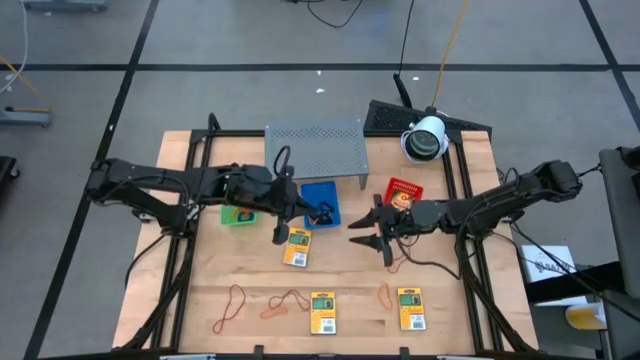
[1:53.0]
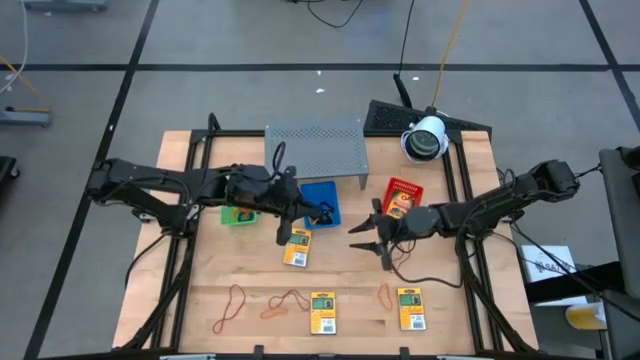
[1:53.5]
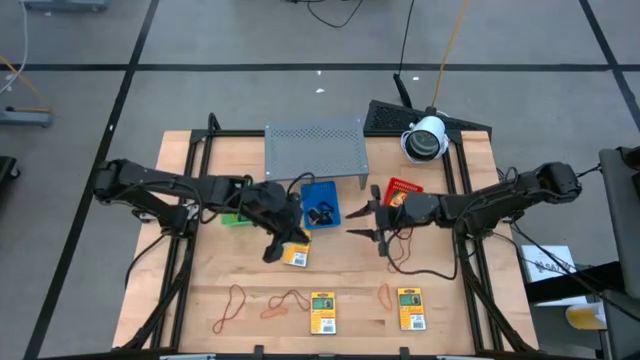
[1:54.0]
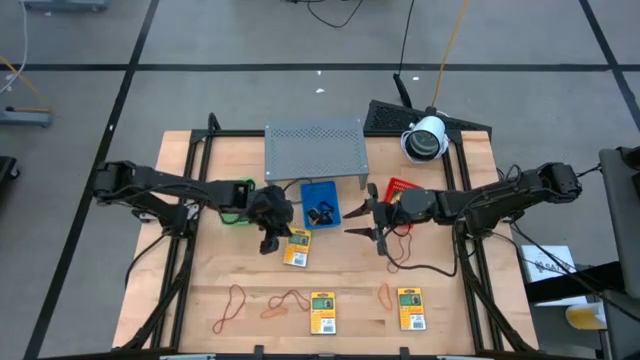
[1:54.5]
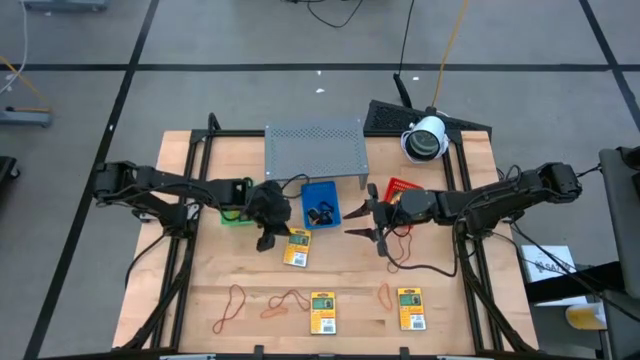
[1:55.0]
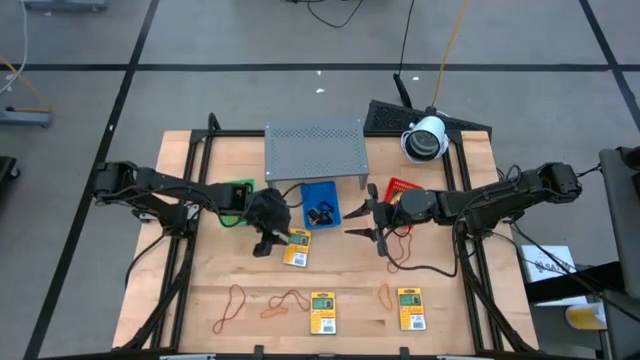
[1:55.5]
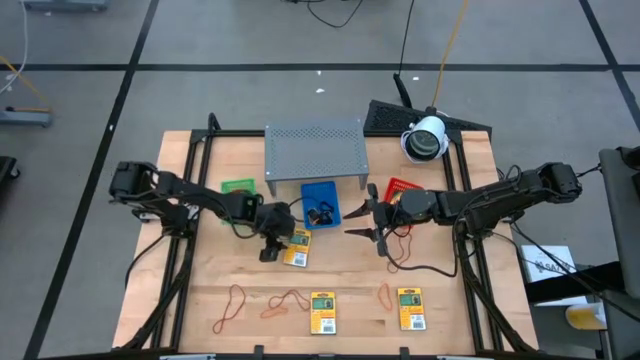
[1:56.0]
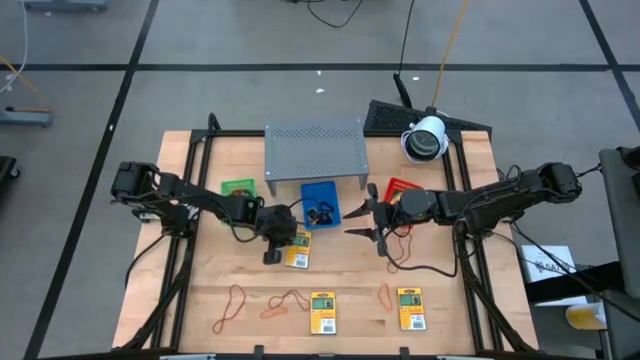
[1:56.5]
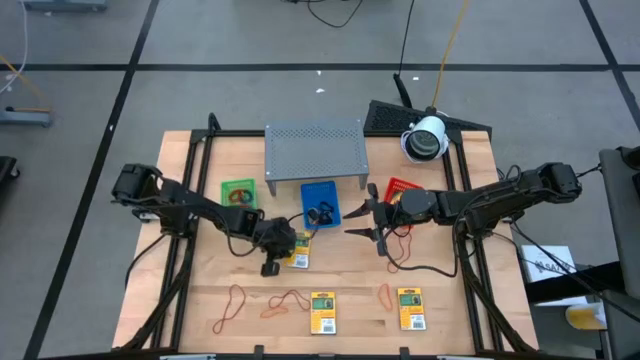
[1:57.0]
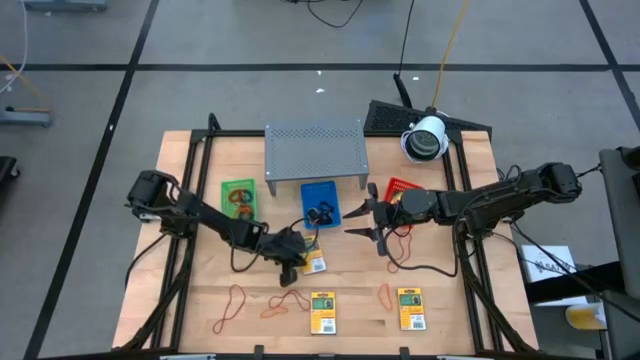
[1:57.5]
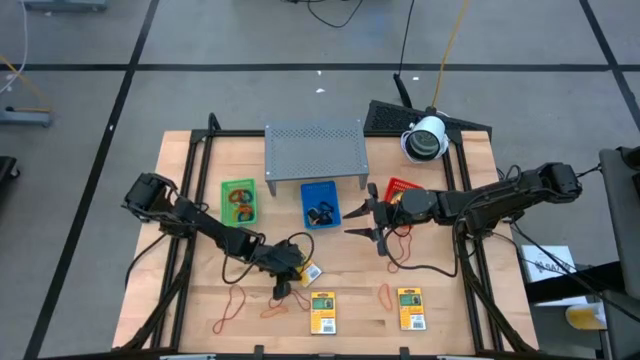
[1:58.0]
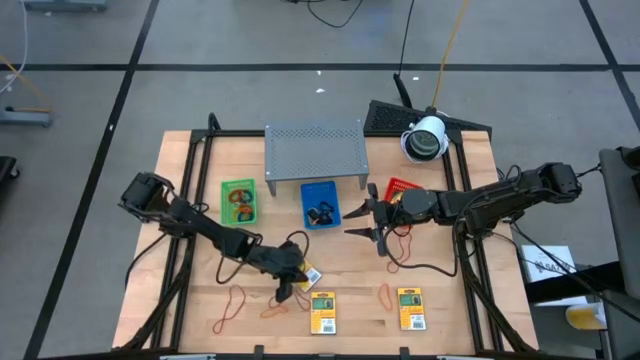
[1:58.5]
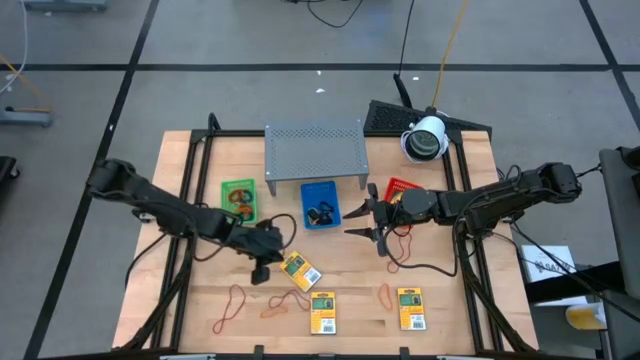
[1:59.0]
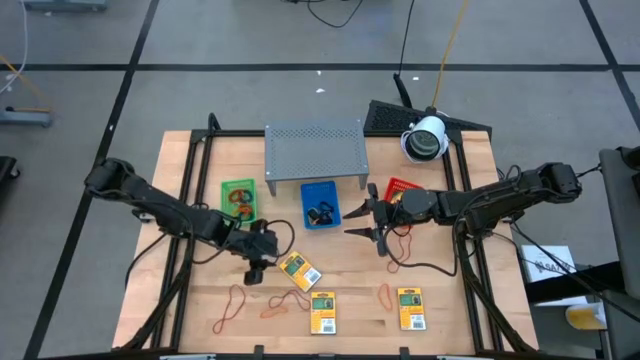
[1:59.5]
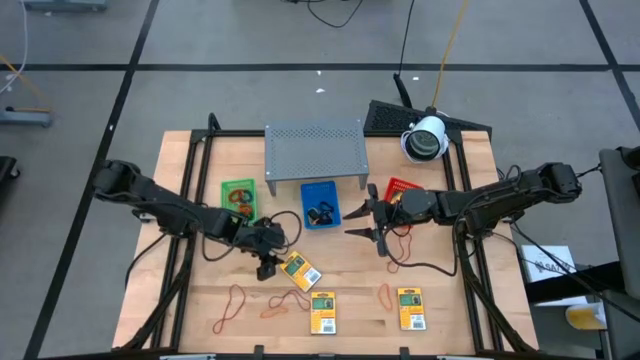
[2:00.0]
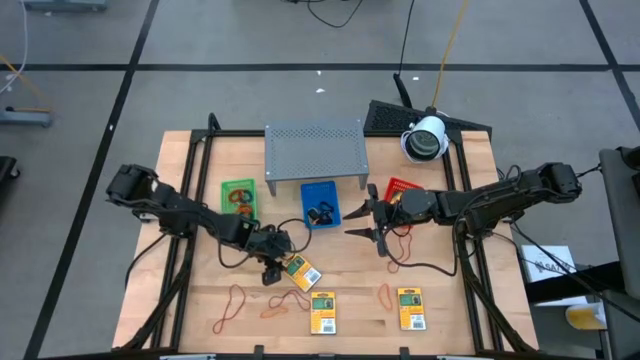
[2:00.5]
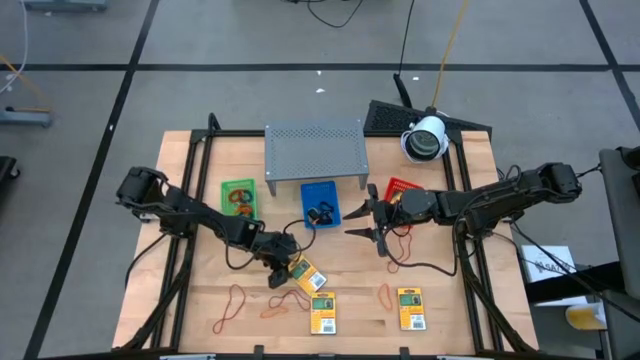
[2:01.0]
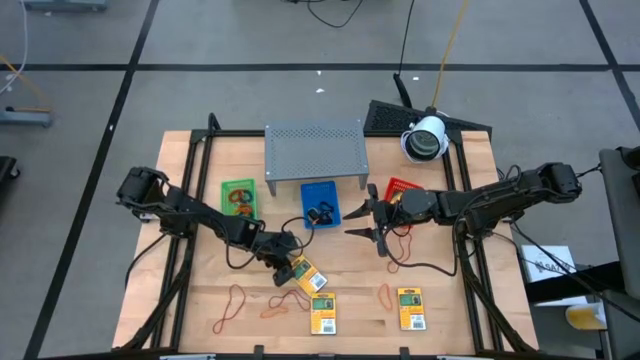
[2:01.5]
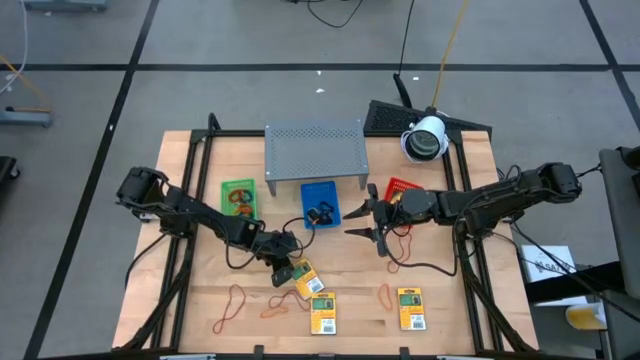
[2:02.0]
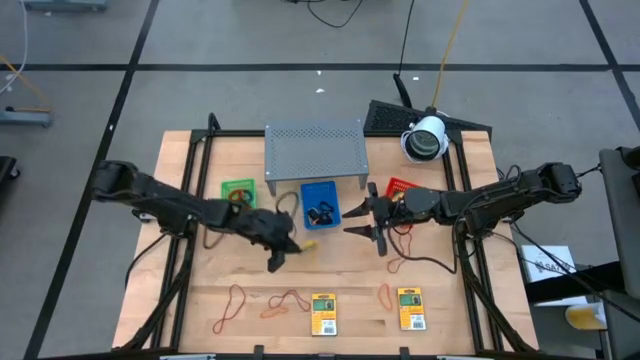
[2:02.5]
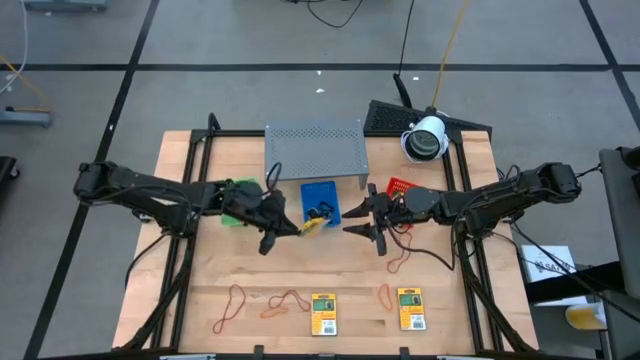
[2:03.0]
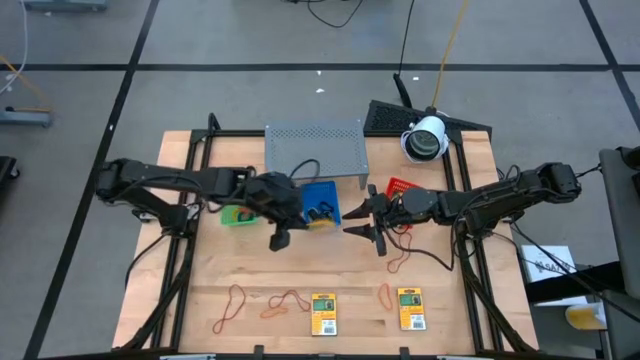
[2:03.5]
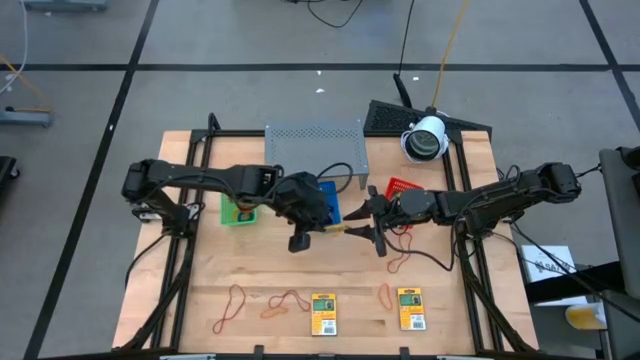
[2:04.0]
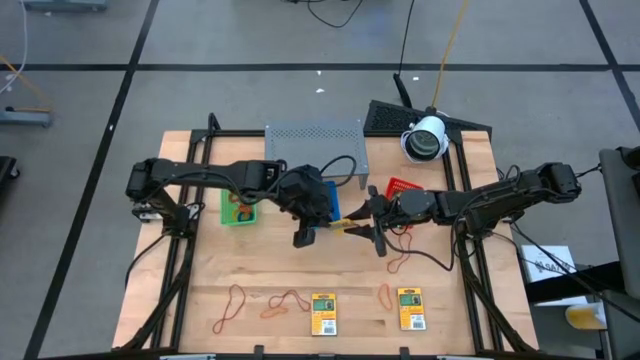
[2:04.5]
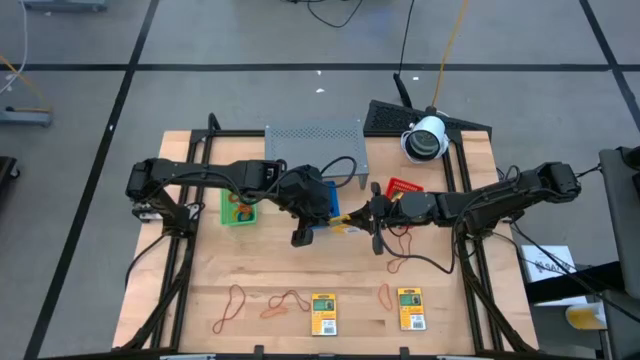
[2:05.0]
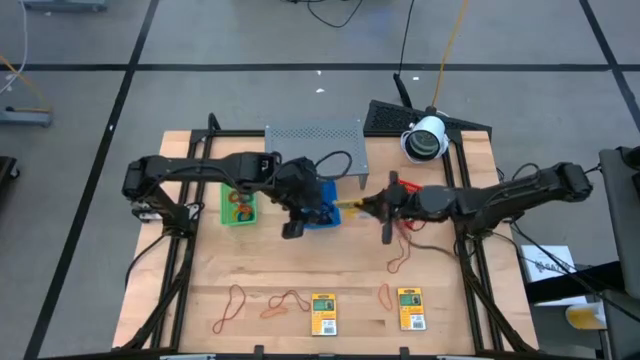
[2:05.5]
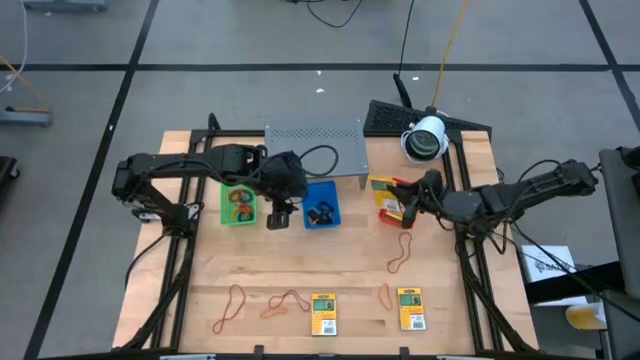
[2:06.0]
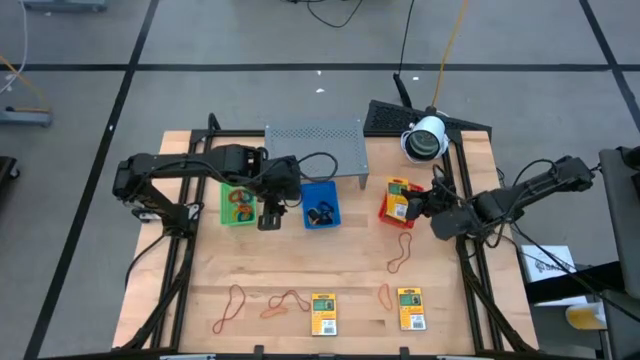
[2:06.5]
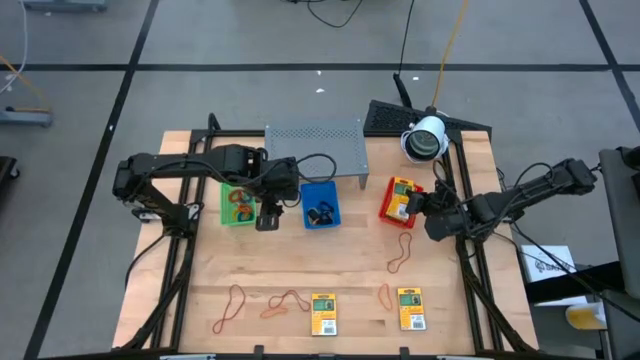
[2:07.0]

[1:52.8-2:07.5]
Task: Pick & Place Office Desk Supplies
Put the crayon pack into the orange bin

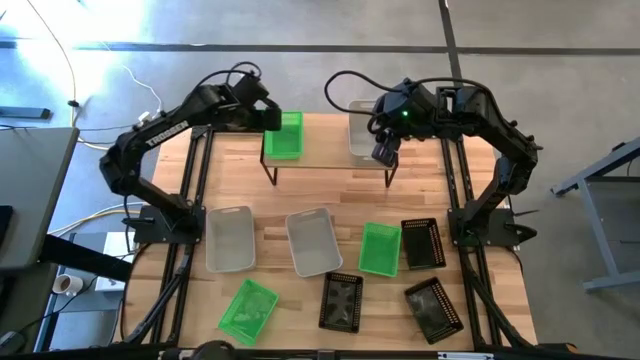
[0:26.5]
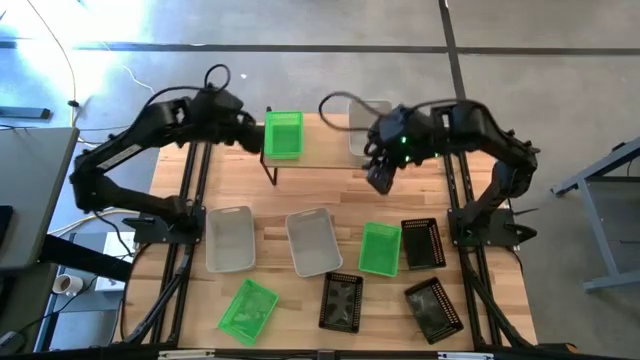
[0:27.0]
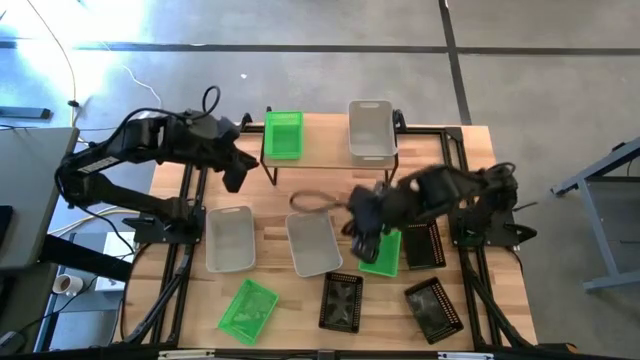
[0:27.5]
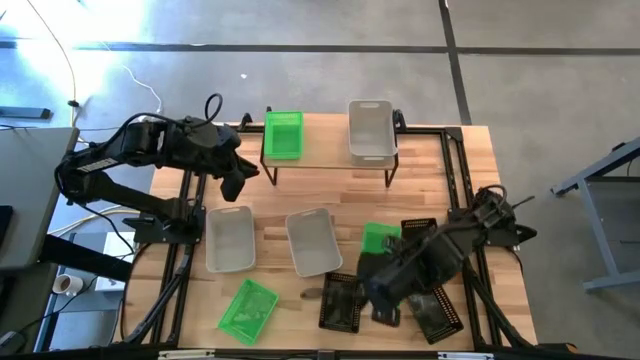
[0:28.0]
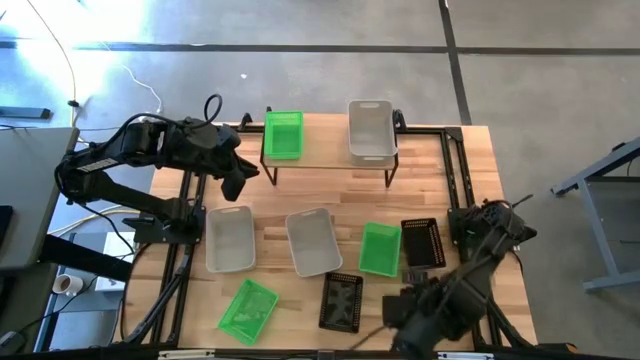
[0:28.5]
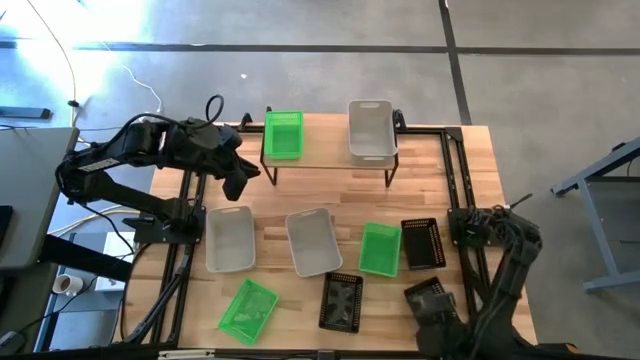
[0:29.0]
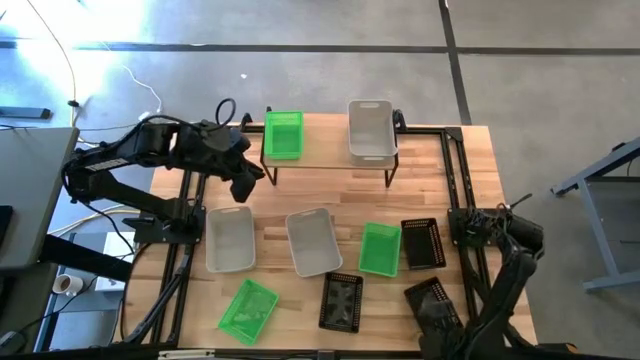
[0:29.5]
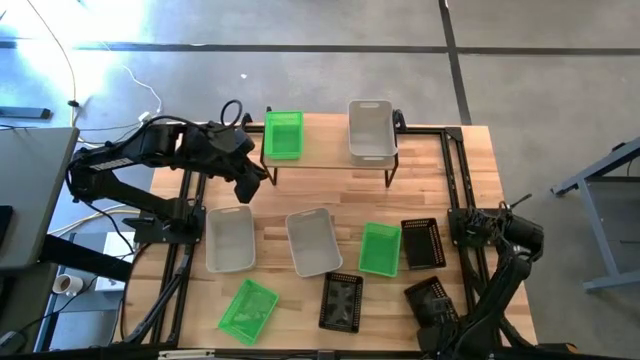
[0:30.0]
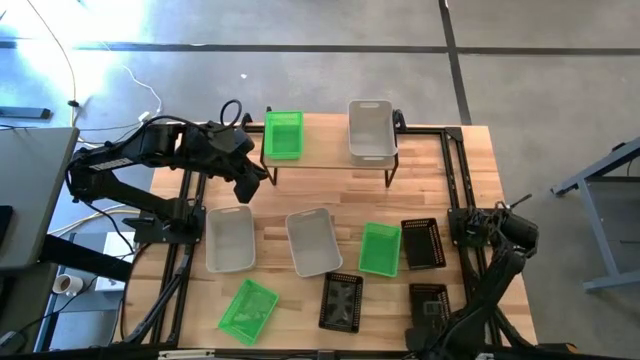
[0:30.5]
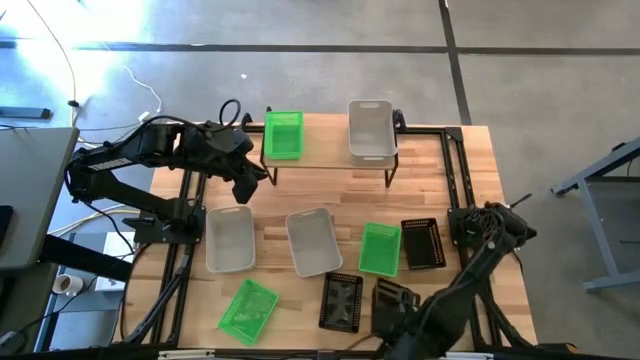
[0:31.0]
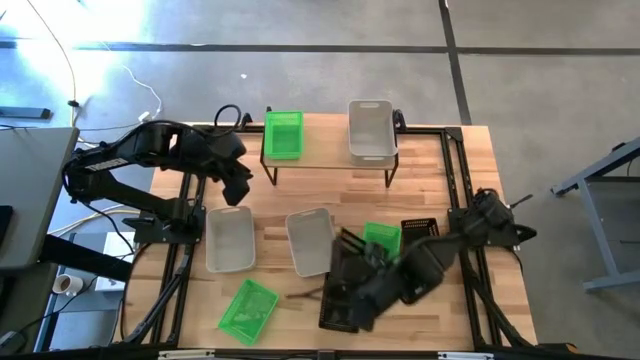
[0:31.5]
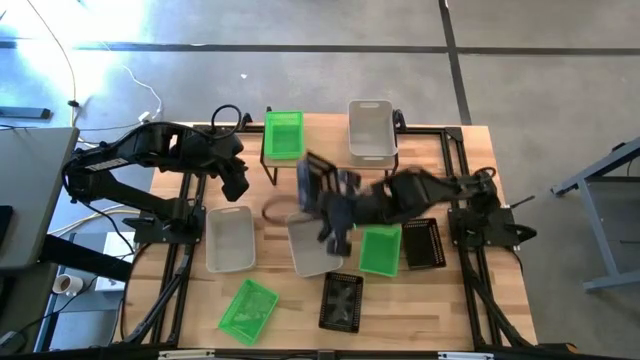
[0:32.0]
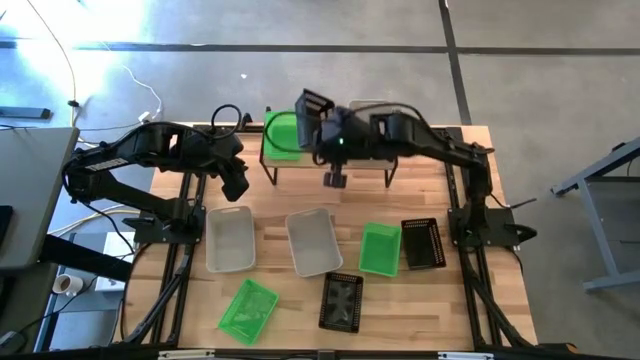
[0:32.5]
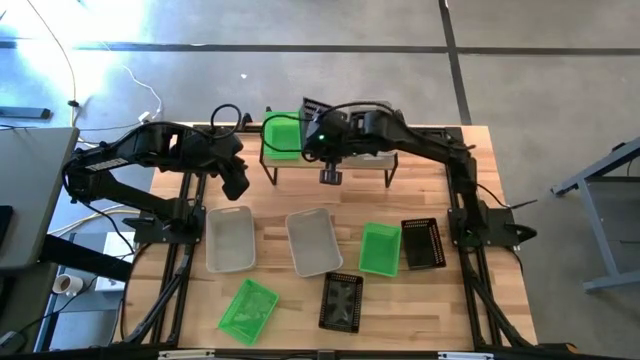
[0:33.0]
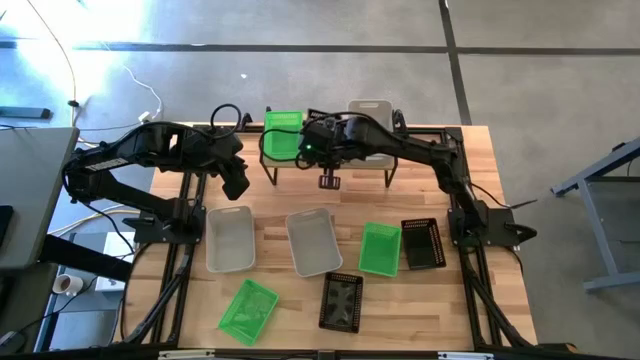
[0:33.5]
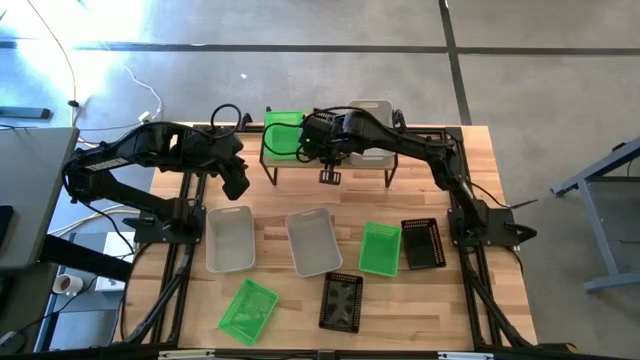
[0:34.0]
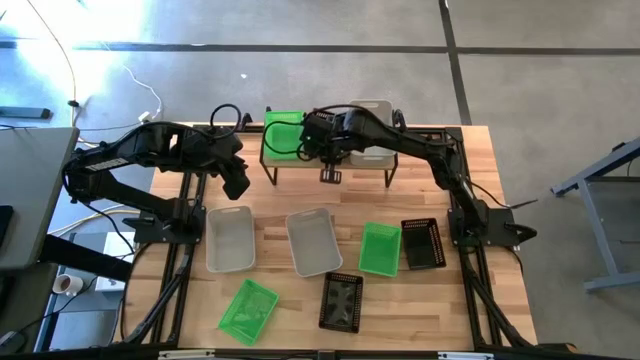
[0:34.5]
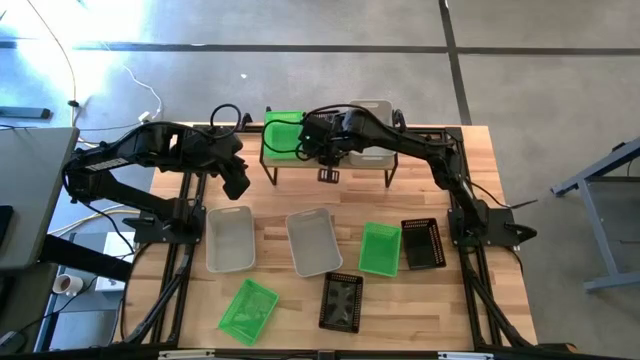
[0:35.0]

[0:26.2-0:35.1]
Task: Stack baskets on shelf by color
Put the bottom right black bin on the shelf
